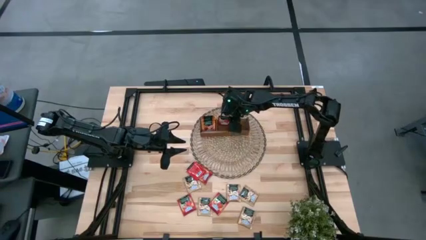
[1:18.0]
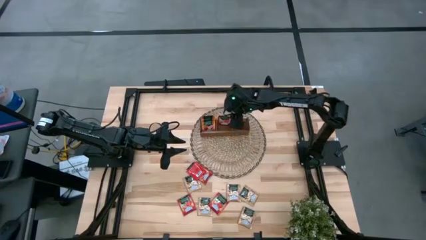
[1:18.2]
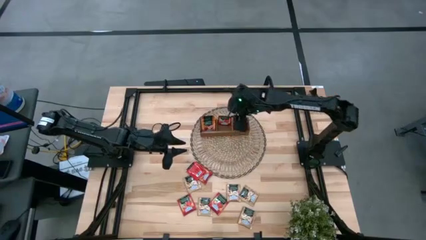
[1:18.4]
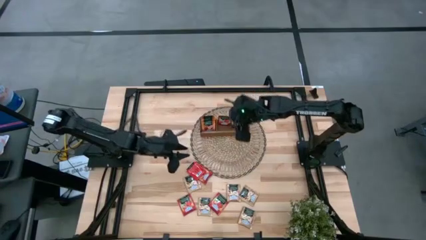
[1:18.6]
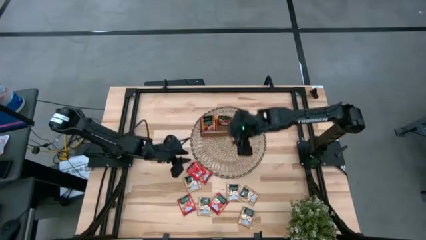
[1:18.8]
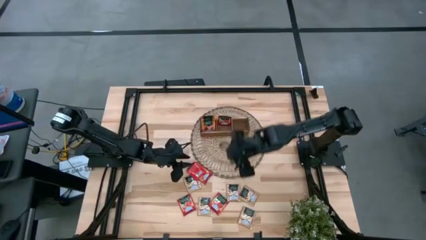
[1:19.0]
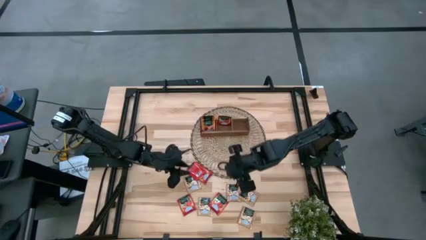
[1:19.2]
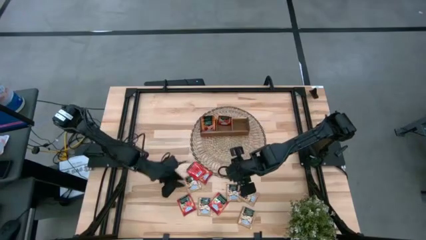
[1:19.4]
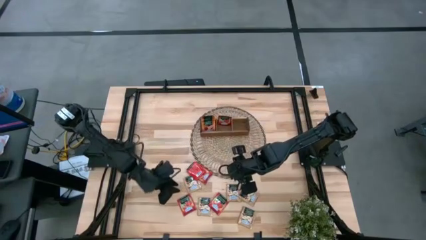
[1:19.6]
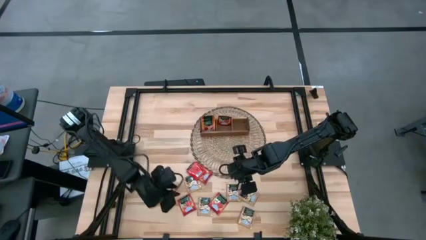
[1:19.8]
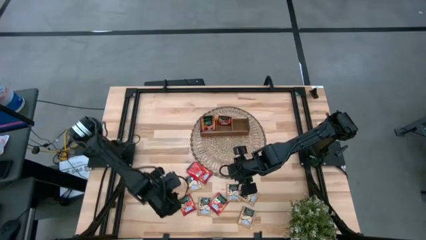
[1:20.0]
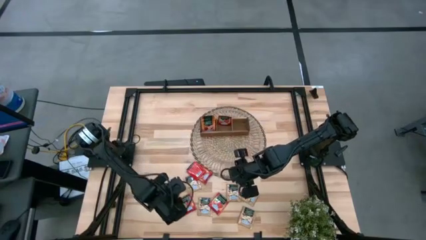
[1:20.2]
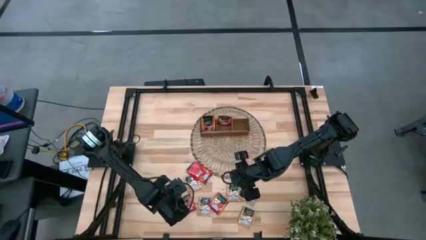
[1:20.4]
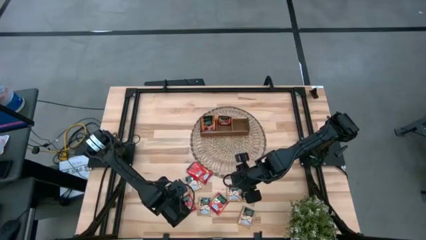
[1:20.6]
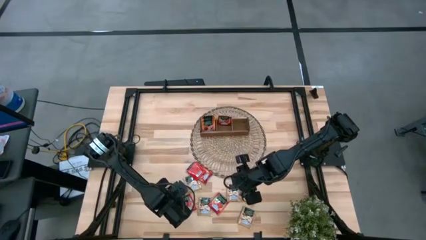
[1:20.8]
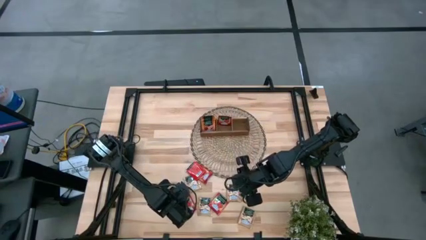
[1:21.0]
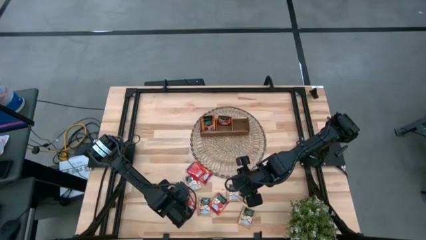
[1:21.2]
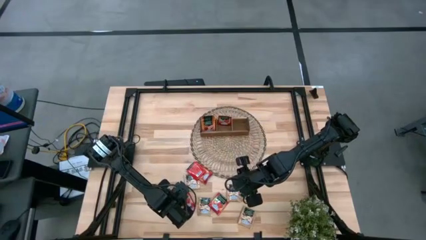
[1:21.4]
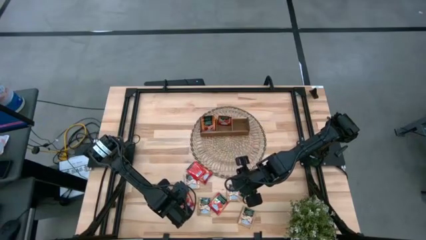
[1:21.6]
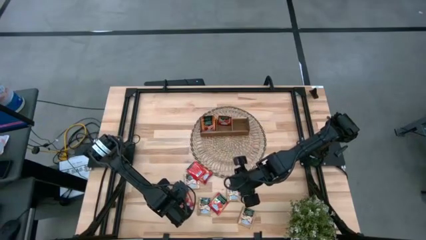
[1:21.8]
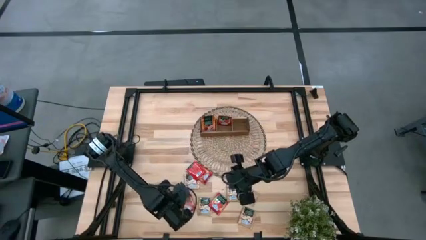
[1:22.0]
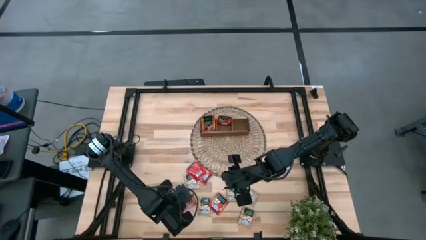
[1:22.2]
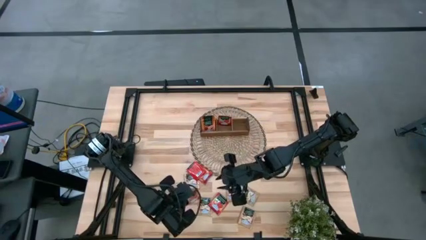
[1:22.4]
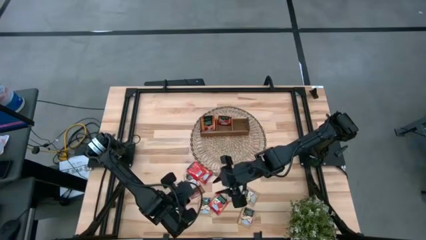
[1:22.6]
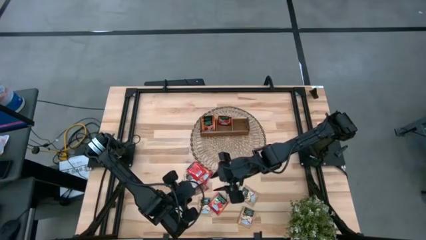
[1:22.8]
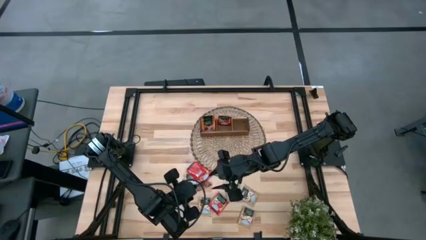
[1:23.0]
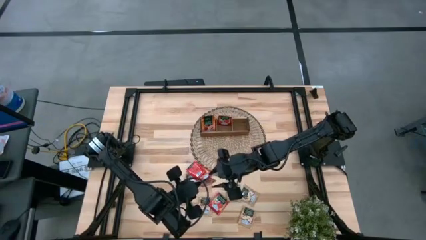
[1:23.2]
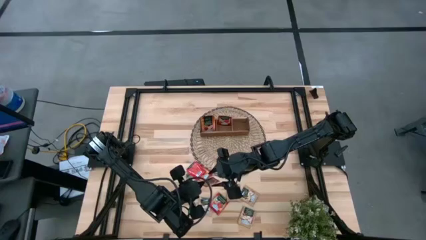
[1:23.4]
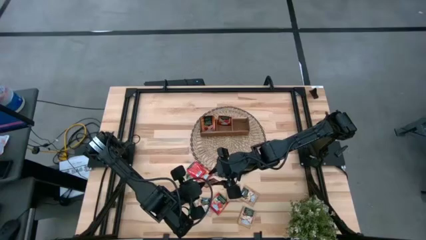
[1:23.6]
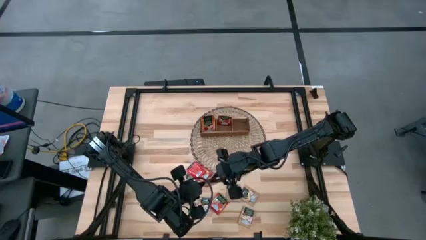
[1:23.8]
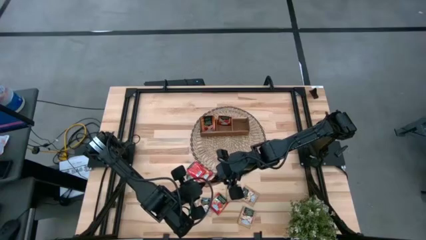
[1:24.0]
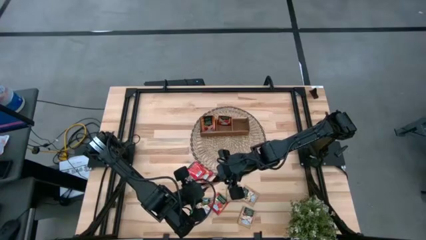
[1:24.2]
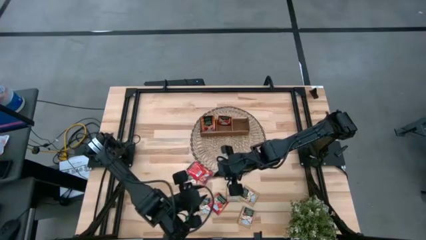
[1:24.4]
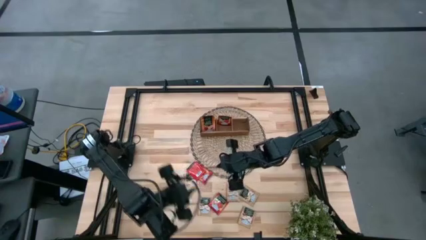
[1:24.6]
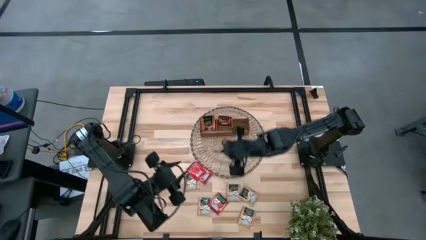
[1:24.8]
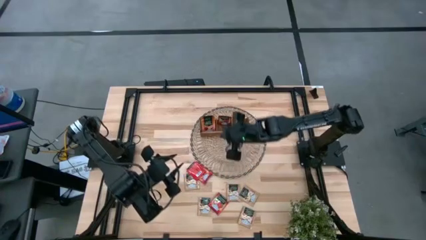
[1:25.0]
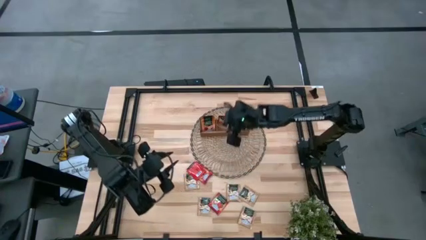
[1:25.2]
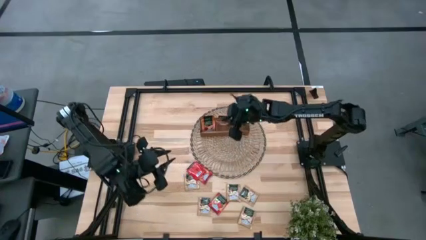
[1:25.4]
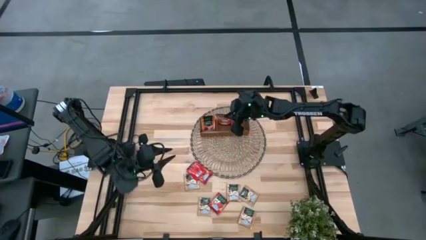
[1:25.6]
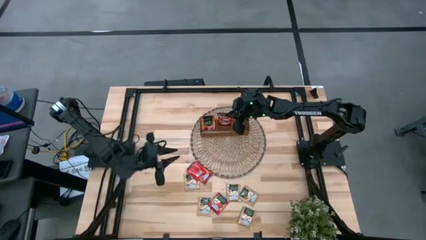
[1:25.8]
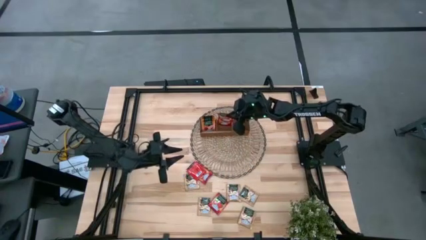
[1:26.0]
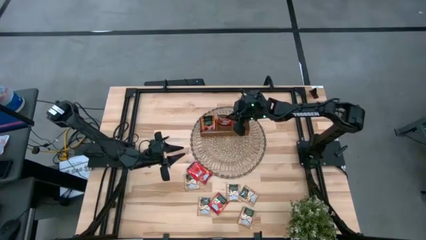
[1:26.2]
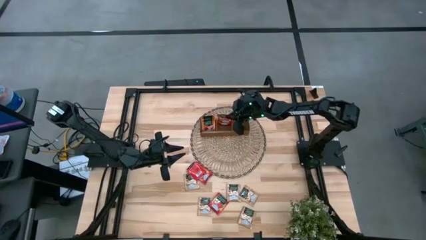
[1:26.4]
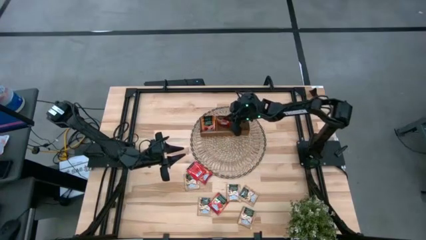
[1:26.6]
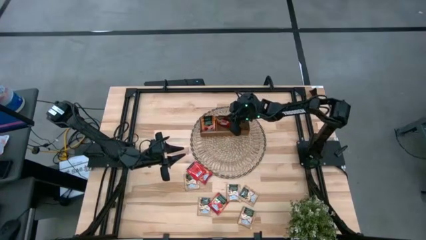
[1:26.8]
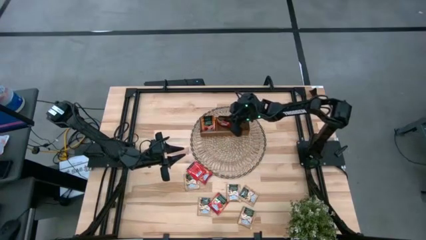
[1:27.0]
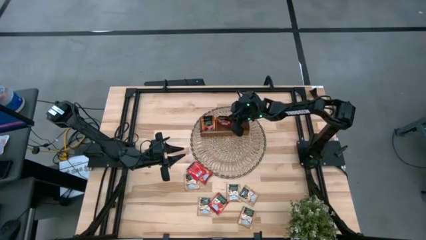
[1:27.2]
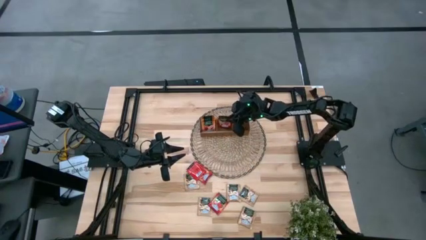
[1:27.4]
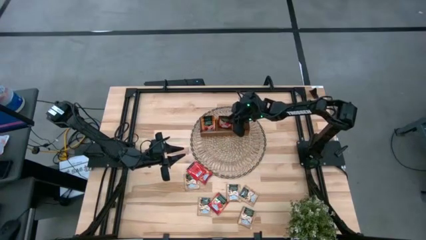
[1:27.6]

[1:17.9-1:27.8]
Task: Pick & Place Tea
Put the red tea bag into the middle section of the wooden organizer

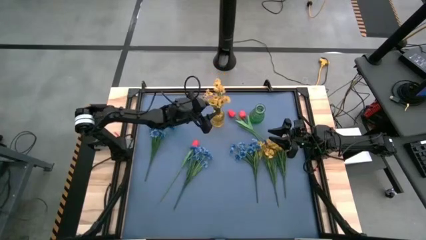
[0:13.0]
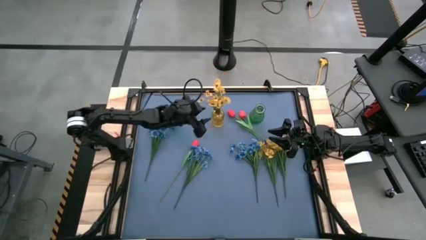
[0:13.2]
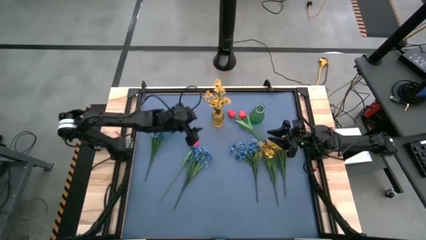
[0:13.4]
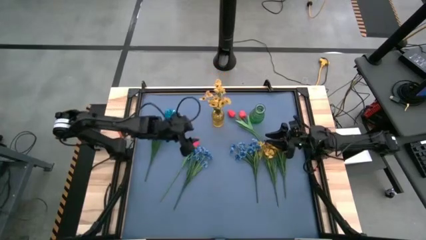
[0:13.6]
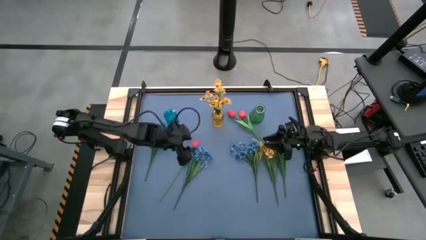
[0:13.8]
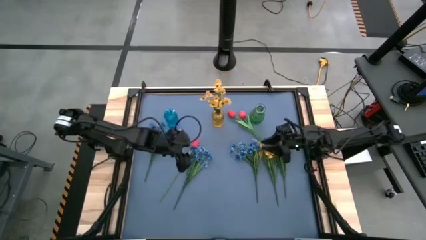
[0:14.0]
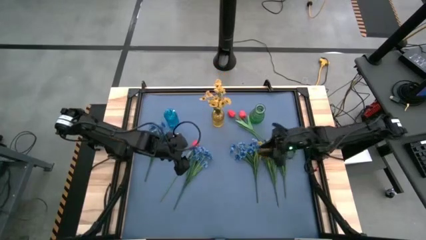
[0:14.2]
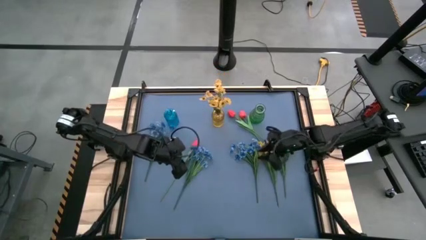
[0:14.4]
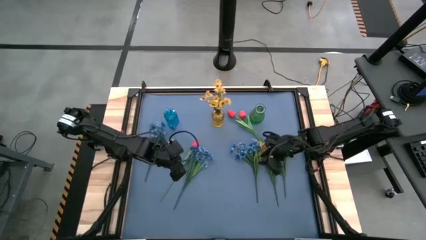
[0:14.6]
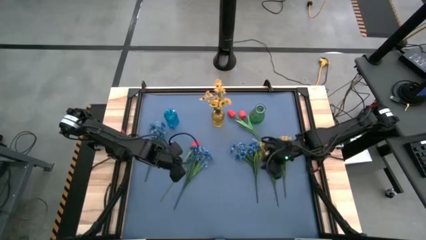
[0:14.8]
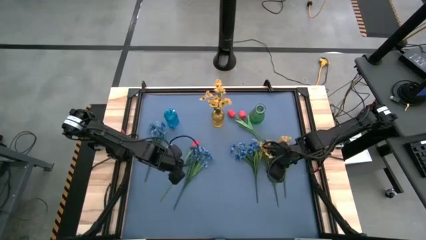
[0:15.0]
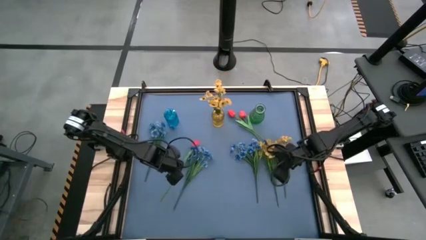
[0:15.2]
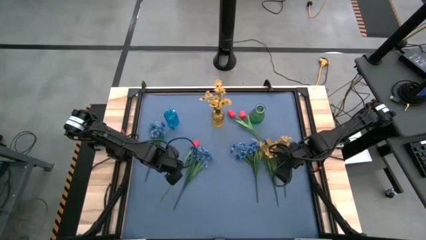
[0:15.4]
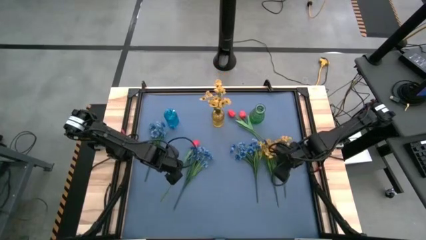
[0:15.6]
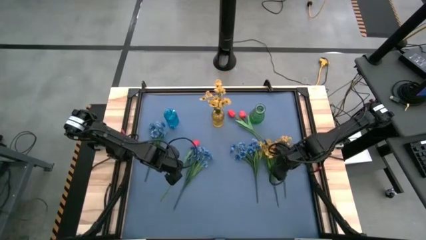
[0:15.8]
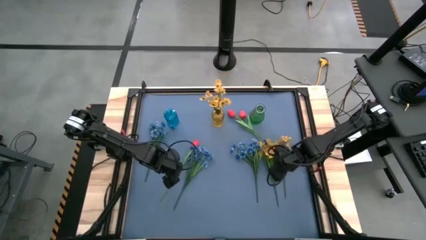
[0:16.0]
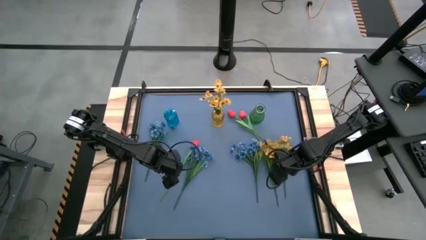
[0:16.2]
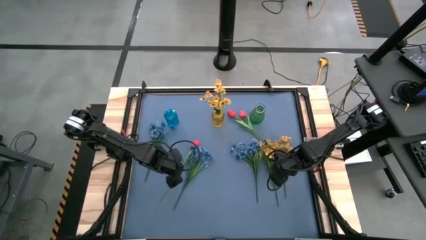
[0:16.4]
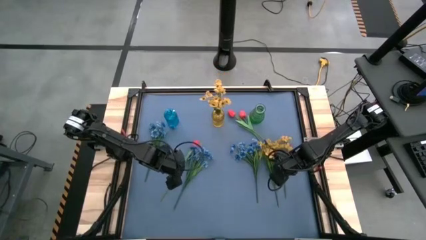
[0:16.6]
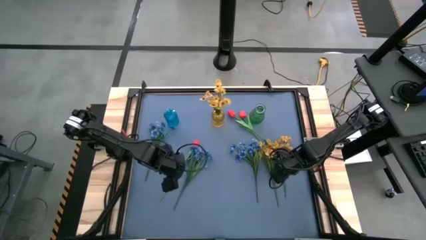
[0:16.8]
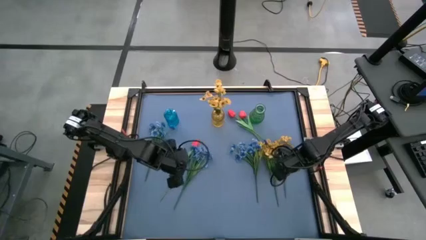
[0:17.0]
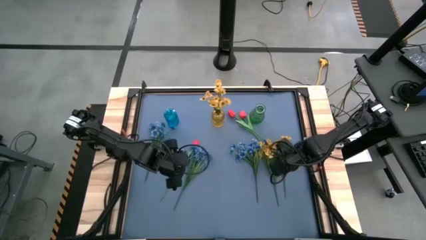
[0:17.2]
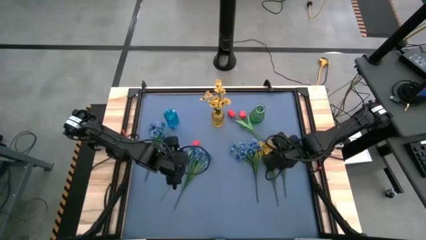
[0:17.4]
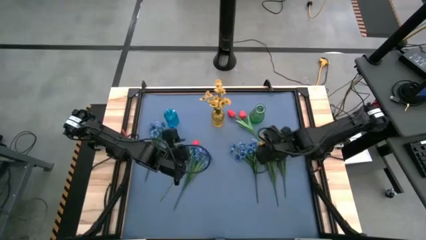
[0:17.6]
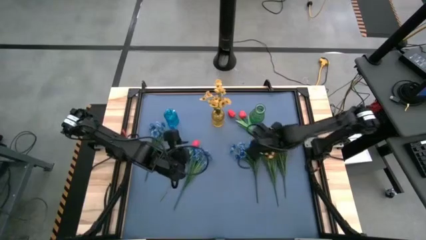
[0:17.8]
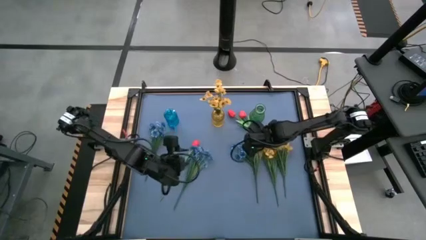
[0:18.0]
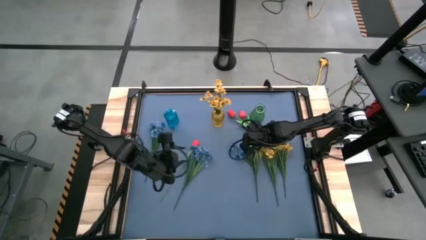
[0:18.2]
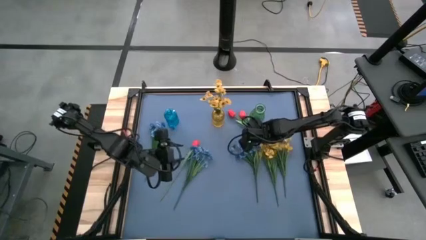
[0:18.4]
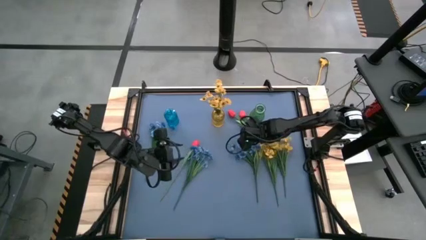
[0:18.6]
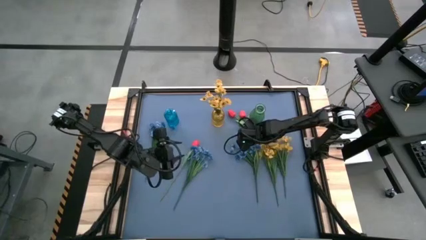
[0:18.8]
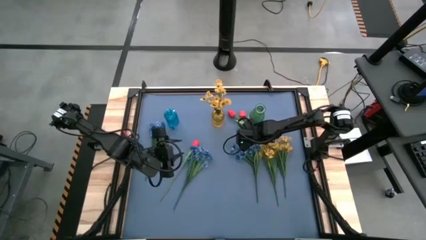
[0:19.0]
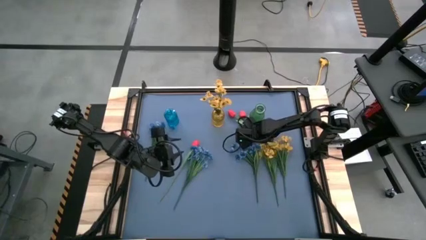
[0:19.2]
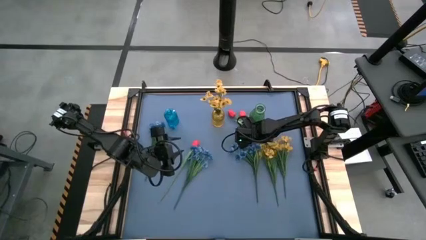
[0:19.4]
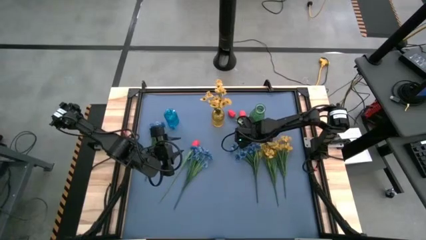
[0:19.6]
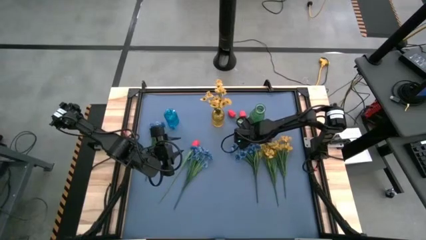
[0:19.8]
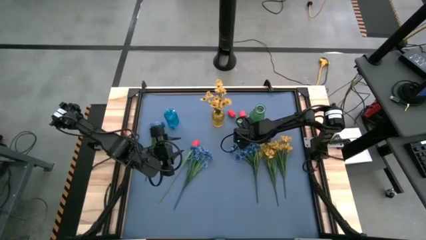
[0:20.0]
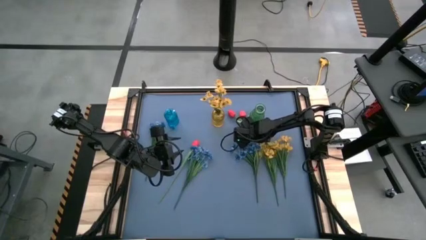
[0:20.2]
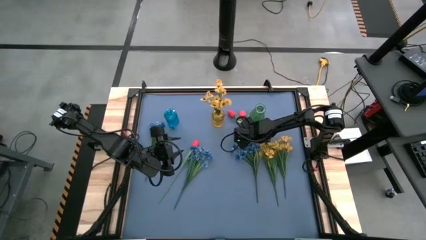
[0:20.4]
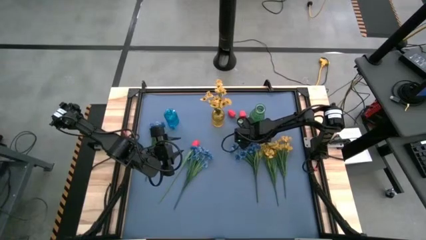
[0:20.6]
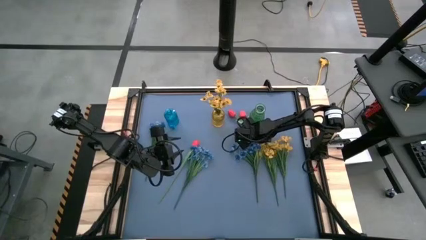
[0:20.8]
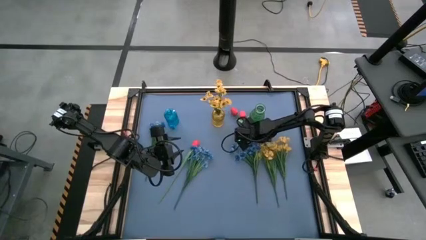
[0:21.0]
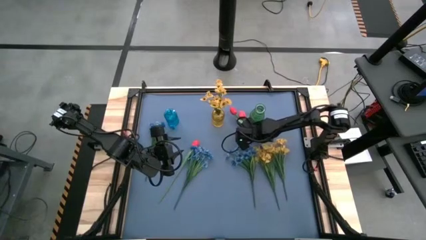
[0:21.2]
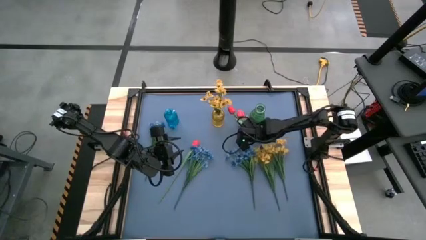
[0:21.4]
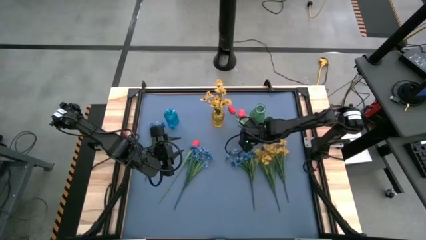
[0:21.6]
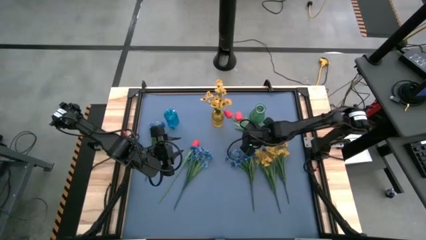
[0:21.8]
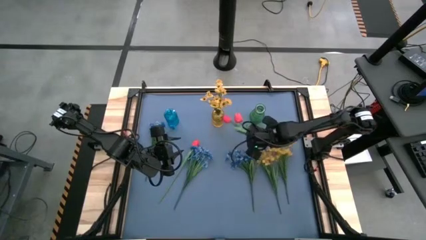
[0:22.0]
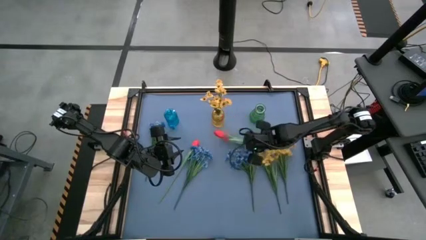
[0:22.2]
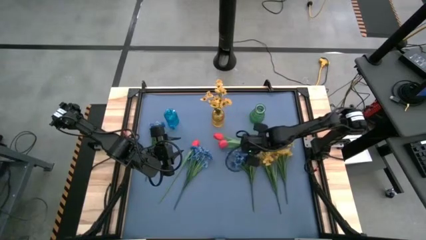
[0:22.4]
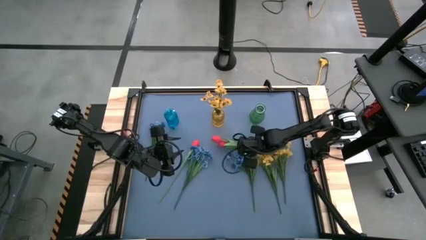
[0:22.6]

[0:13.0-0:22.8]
Task: Sort flowers into vase by color
Put the top left red tulip into the blue vase
